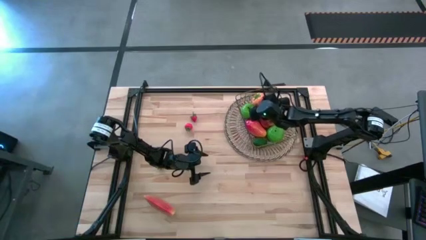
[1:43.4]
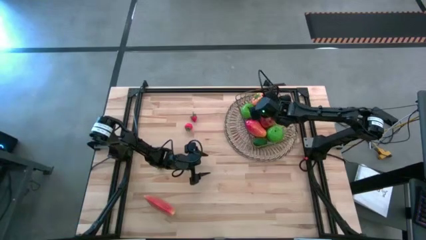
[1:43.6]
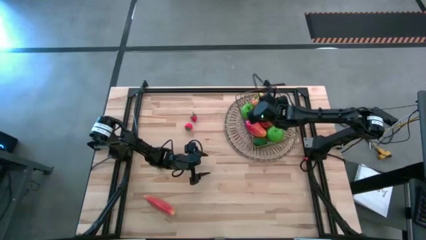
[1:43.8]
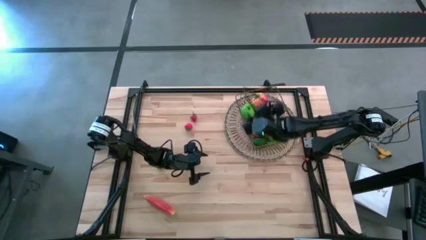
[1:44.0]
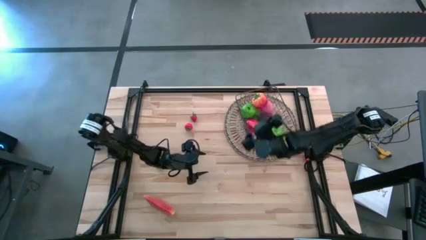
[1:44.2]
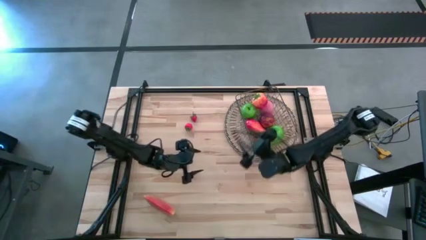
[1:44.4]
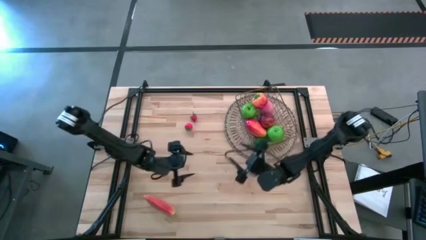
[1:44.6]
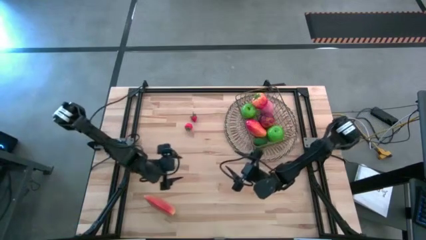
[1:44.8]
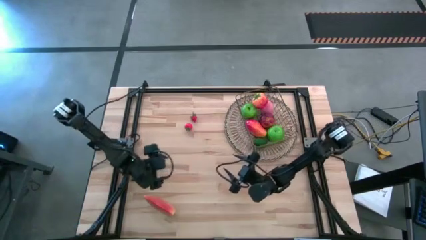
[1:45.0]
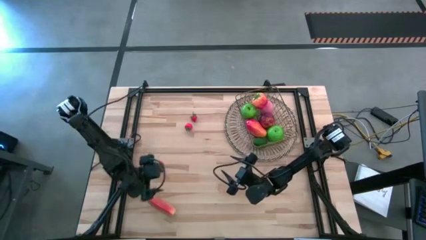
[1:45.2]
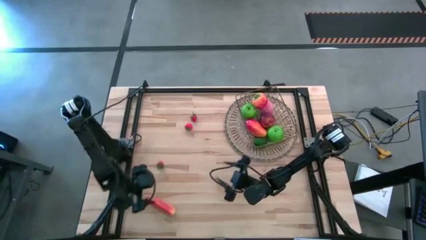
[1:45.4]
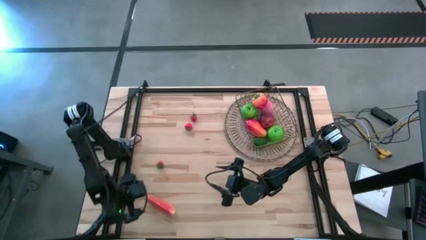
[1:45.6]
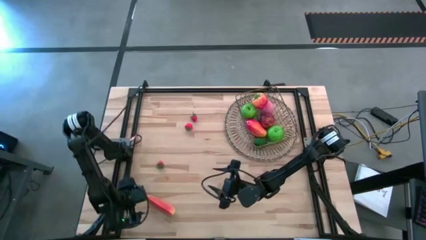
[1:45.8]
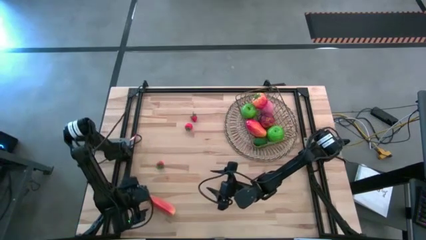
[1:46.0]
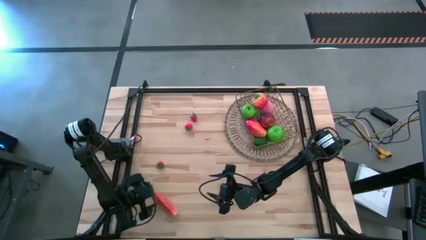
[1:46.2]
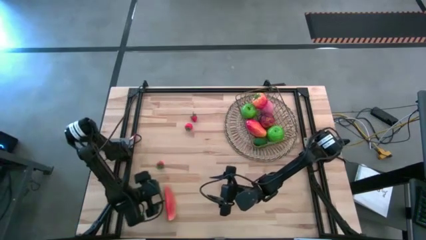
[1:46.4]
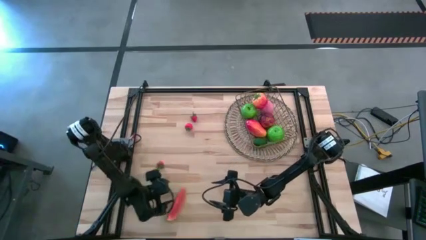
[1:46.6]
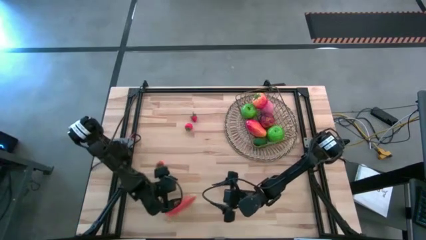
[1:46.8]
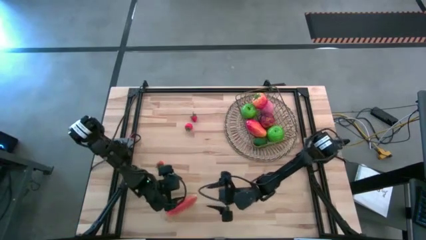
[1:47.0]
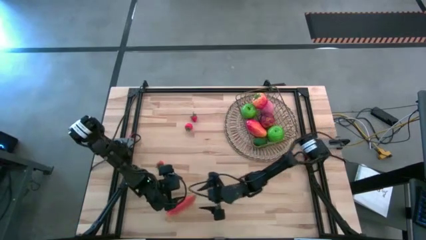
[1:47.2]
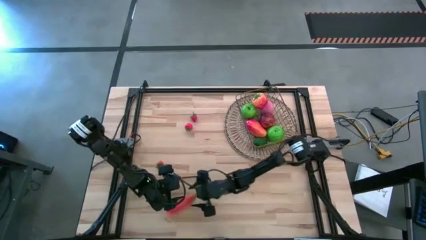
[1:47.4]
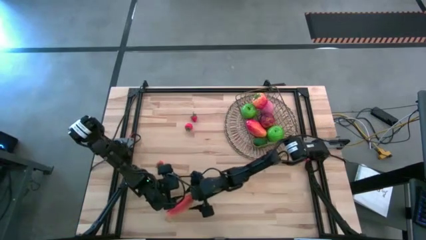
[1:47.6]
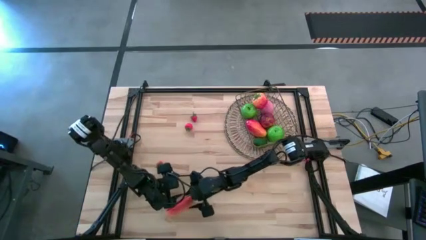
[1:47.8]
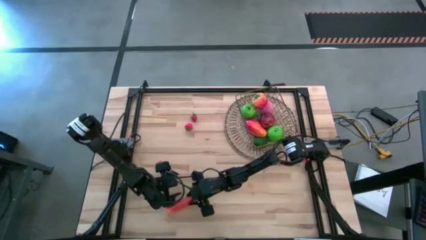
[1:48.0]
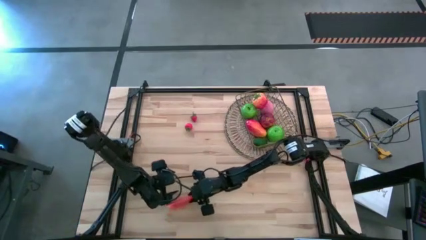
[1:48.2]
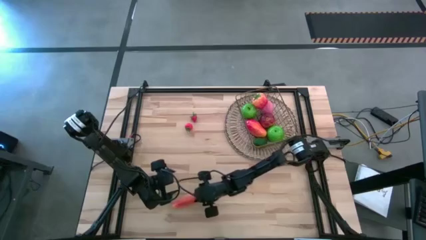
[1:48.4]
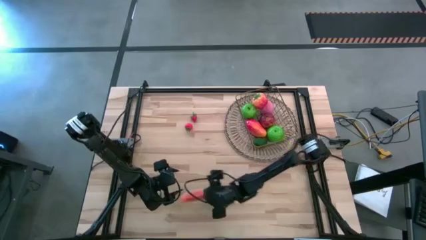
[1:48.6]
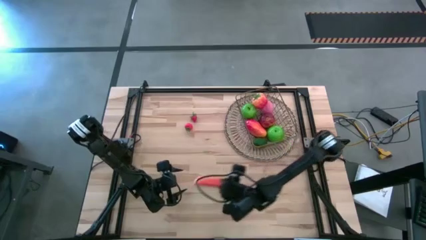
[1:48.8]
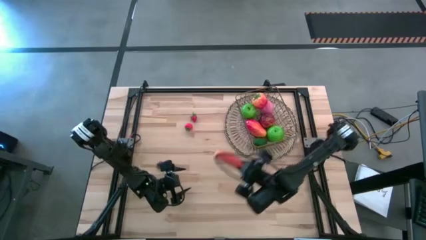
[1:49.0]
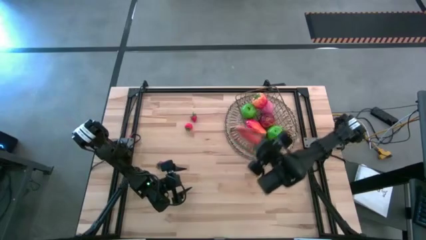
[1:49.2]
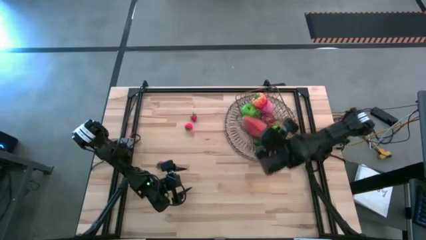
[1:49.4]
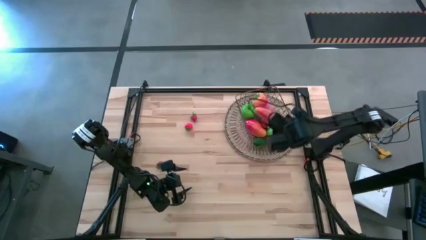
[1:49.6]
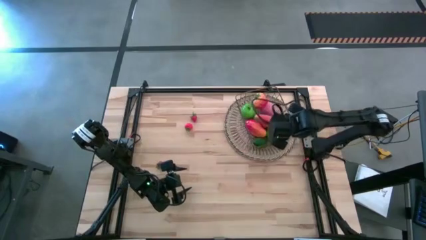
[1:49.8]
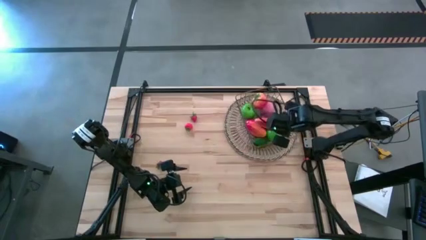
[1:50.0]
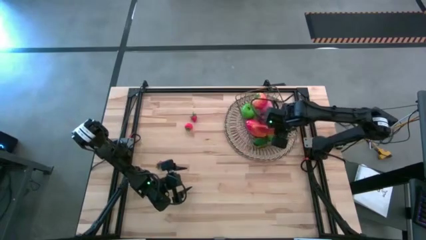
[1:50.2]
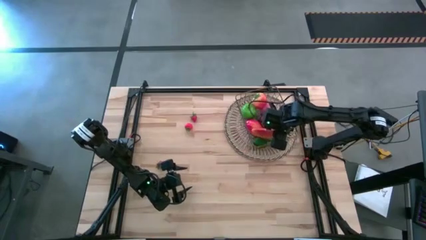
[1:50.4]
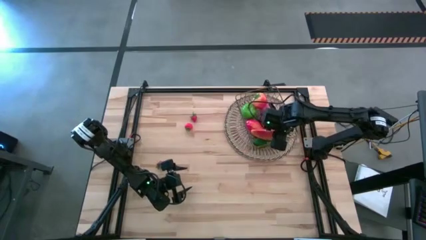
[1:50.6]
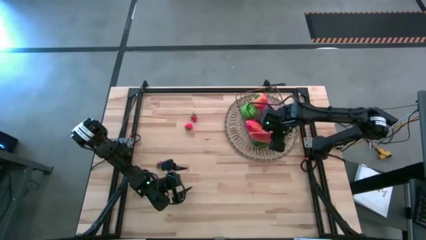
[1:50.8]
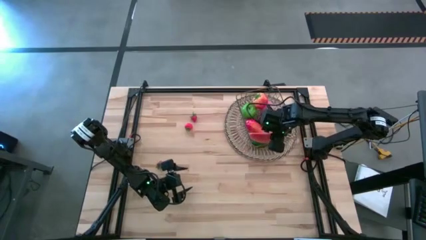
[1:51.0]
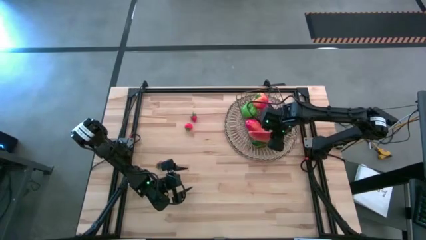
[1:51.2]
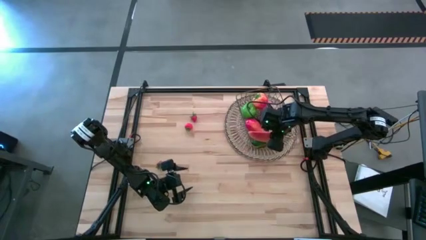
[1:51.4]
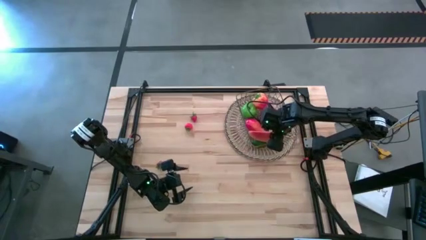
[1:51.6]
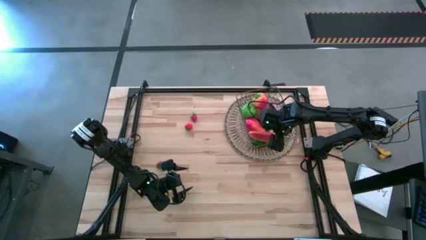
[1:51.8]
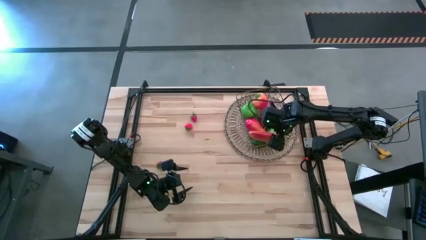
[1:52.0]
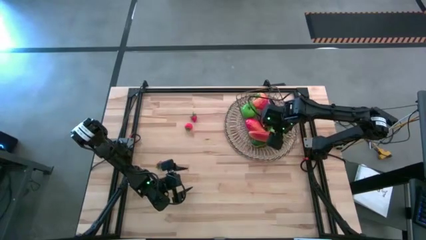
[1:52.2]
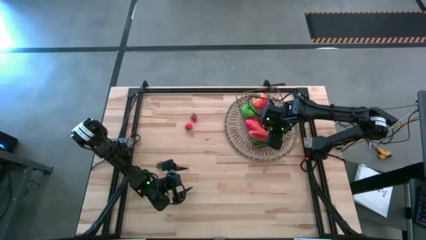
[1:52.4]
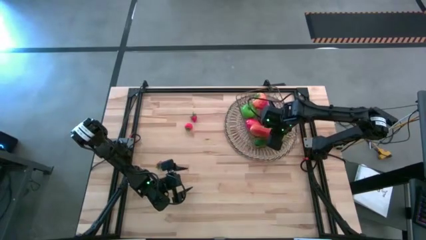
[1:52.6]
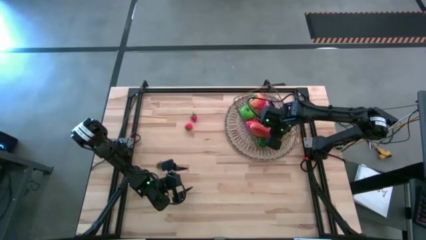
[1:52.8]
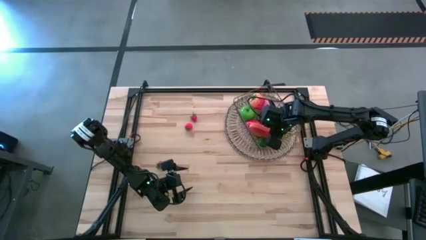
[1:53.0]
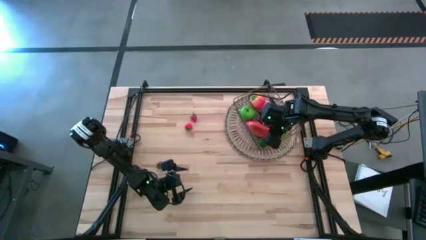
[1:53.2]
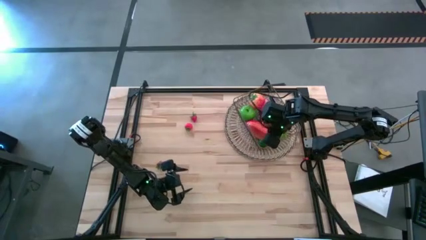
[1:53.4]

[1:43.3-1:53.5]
Task: Build produce basket
Put the watermelon into the gold wire basket

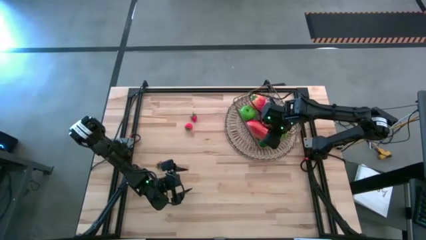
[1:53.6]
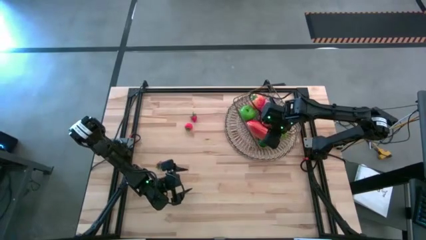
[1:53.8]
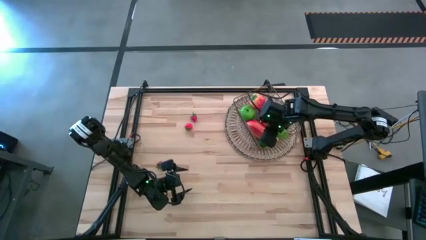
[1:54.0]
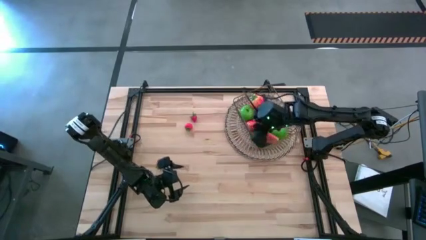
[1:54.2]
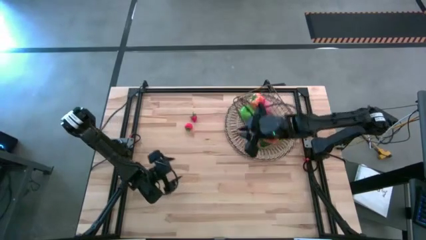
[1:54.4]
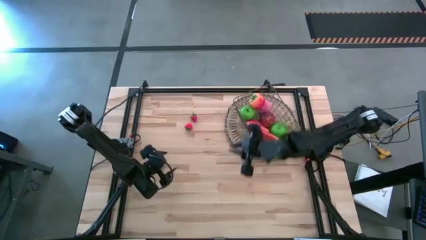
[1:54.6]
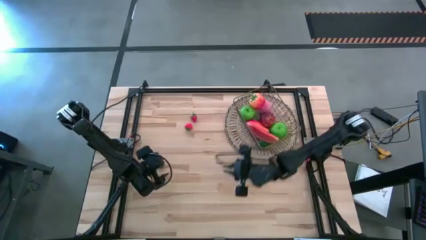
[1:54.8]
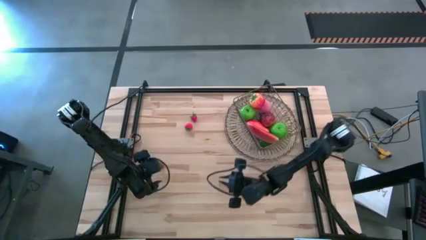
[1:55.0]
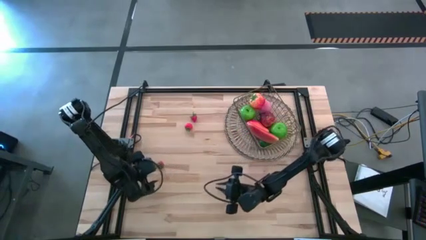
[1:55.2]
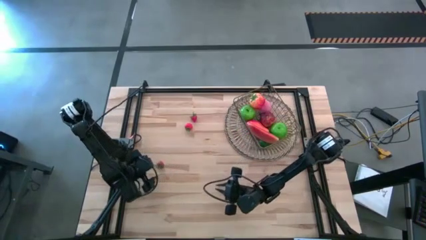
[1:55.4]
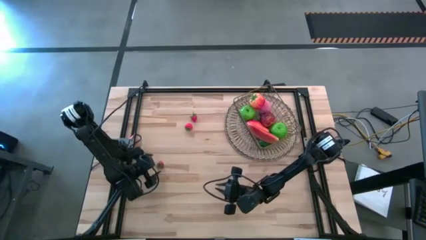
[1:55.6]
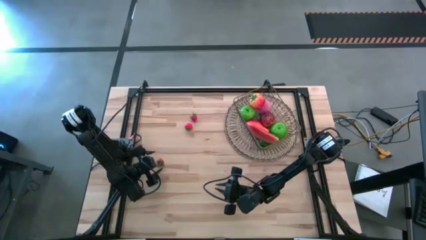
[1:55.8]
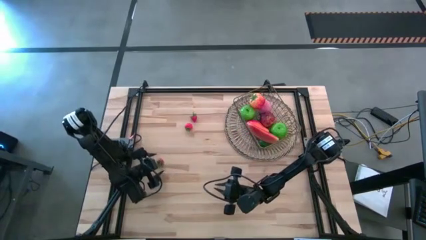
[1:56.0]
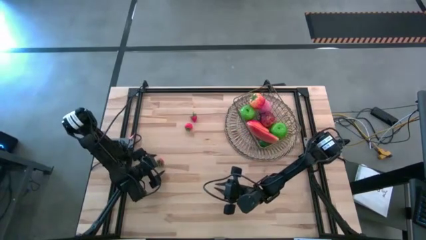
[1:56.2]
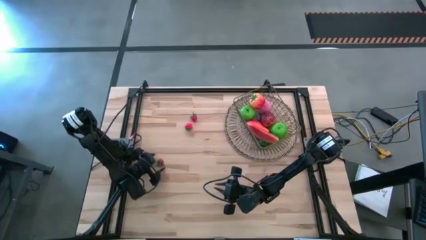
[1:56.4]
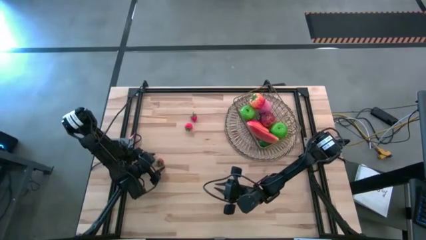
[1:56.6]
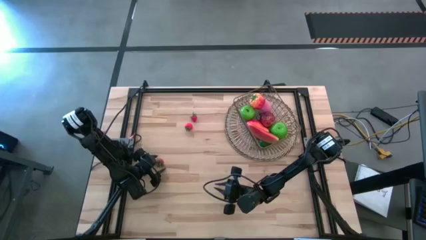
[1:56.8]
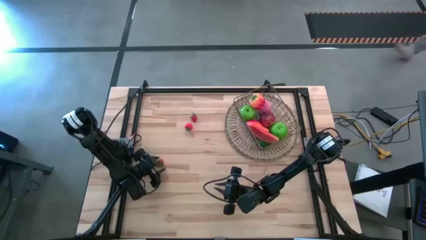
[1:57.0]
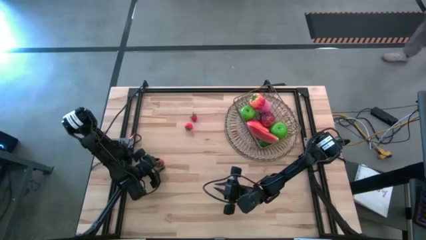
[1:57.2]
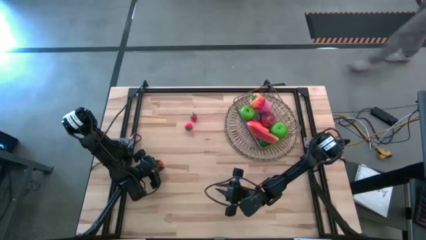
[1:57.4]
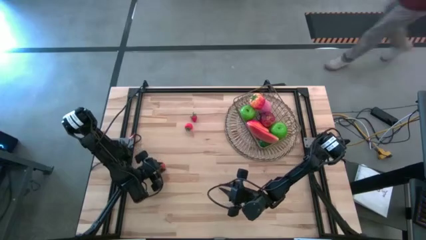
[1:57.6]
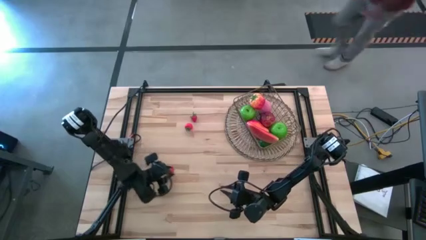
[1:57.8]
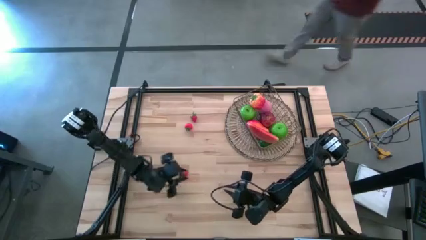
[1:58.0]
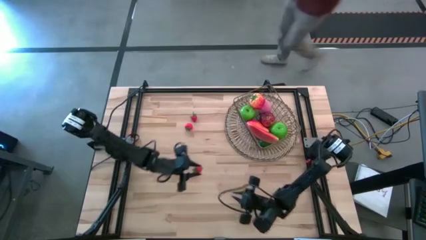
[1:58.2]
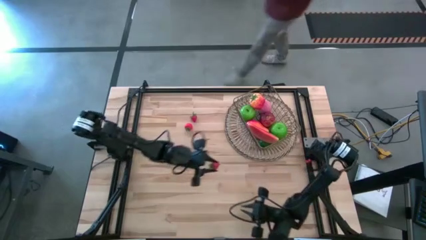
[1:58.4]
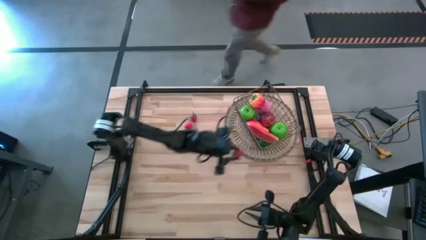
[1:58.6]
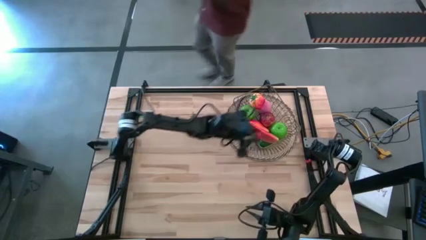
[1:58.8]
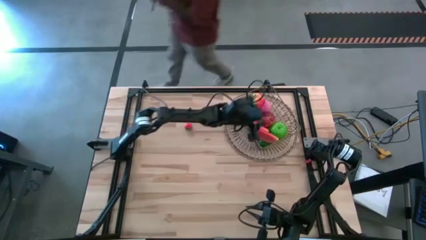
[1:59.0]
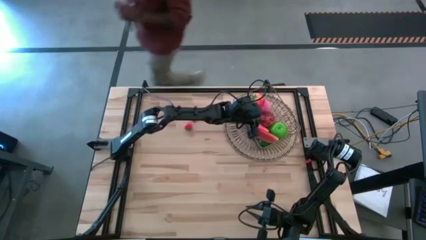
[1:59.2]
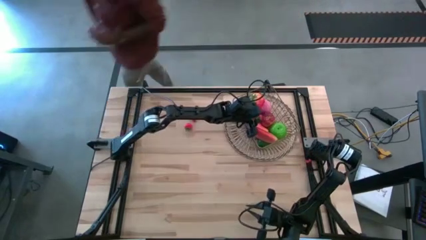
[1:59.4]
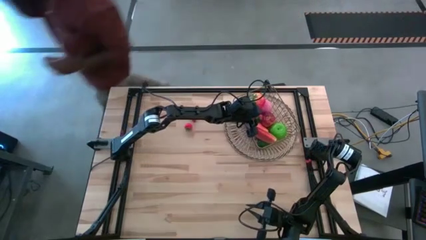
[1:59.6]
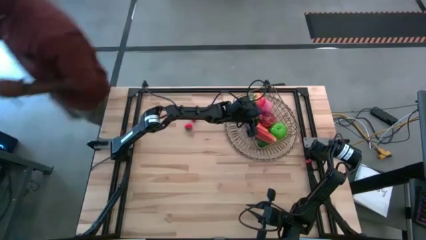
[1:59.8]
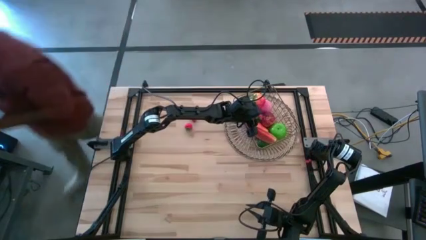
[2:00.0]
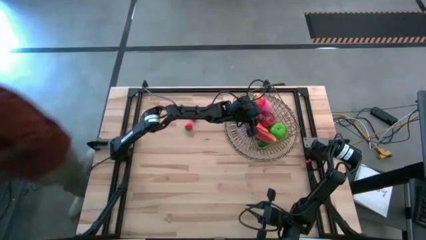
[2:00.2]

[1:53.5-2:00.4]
Put the bottom strawberry into the gold wire basket
